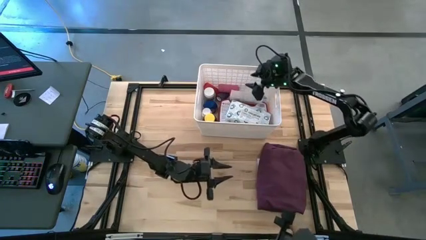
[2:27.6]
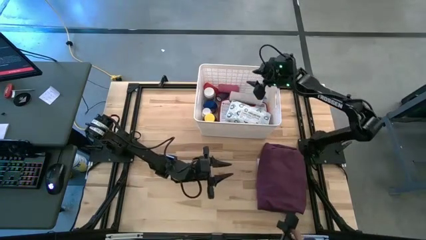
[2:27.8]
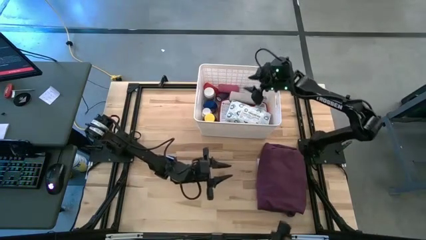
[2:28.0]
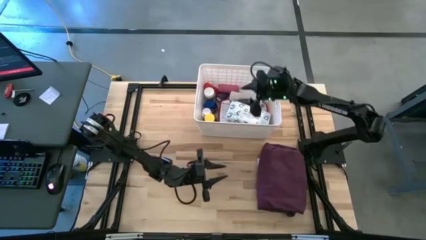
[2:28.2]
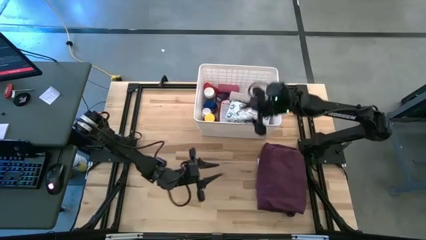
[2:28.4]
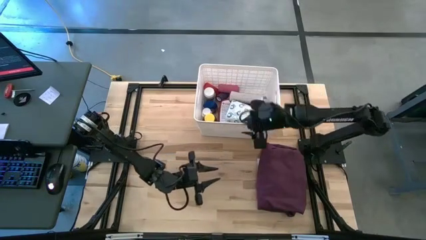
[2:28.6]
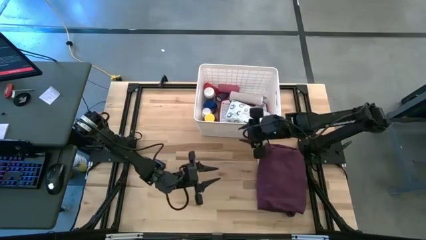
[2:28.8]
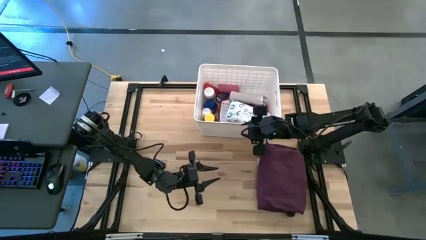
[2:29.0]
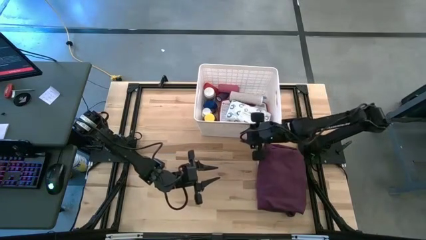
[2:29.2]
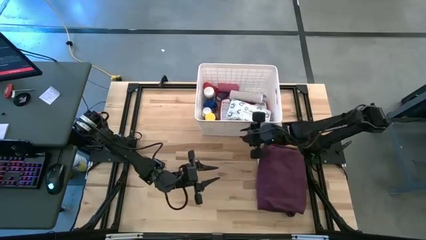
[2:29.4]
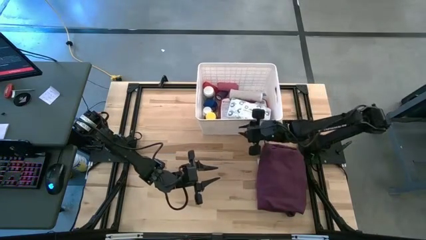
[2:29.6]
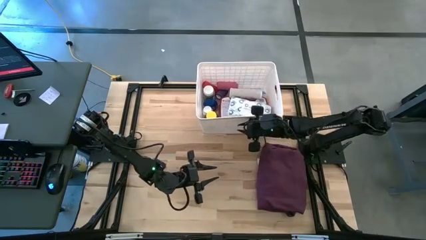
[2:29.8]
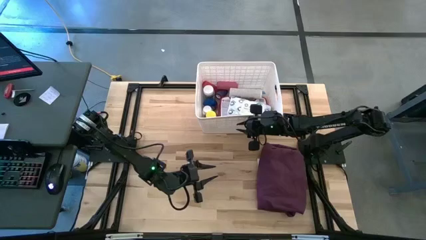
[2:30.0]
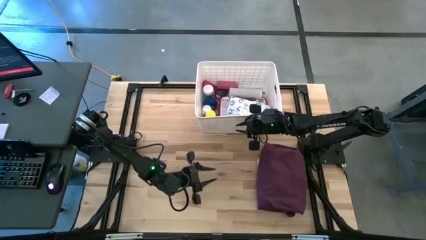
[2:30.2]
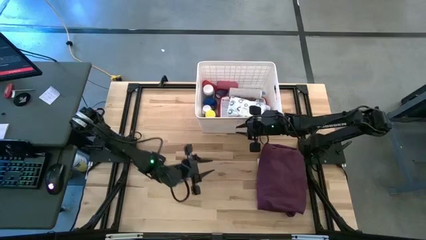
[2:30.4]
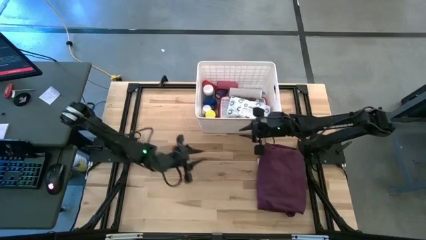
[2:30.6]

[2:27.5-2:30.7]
Task: Pick & place medical supplies in basket/bin
Adjust the white container

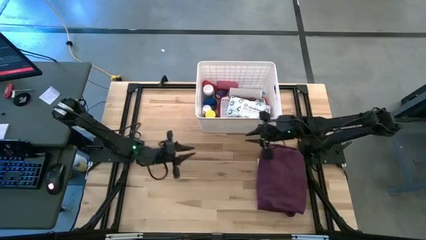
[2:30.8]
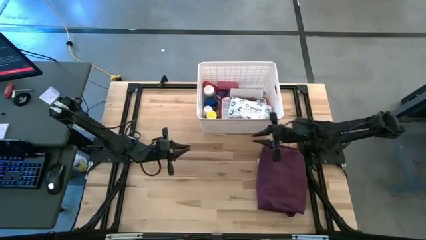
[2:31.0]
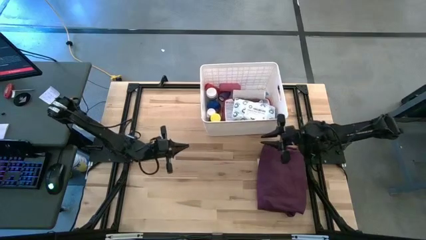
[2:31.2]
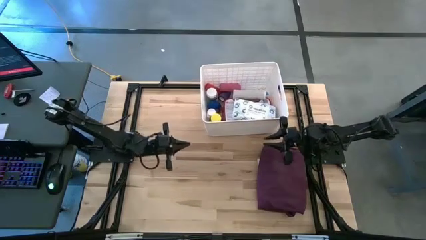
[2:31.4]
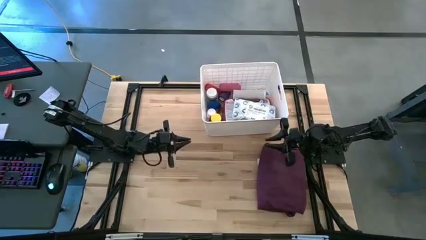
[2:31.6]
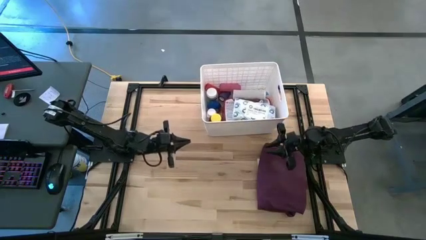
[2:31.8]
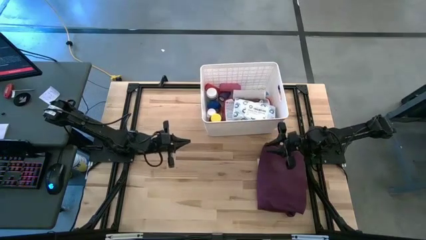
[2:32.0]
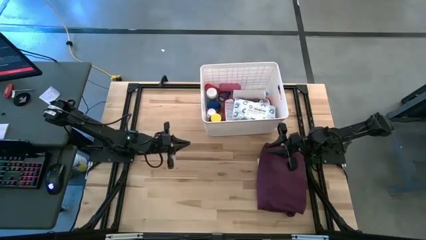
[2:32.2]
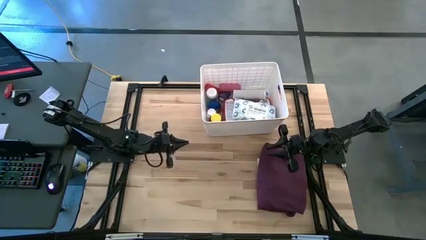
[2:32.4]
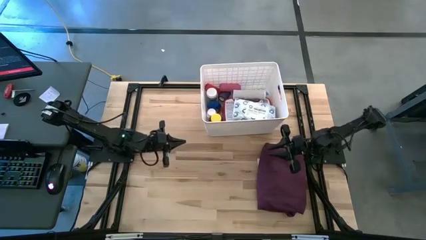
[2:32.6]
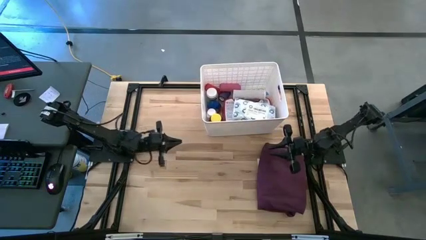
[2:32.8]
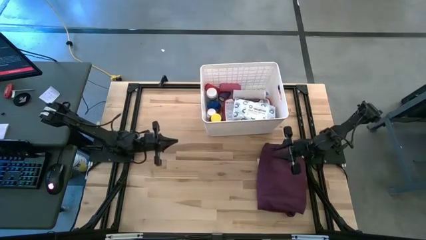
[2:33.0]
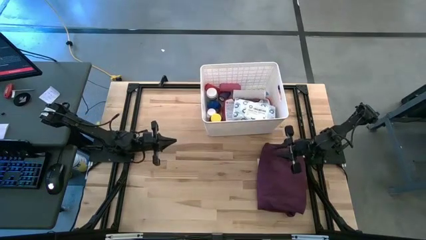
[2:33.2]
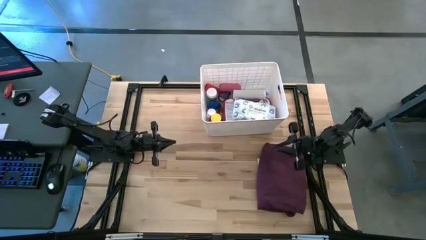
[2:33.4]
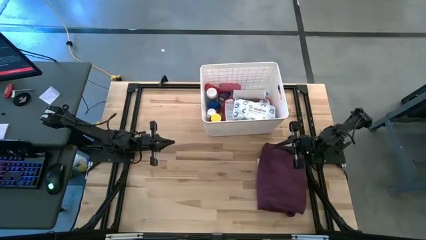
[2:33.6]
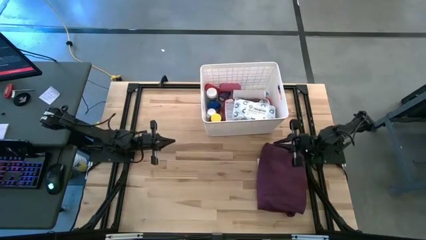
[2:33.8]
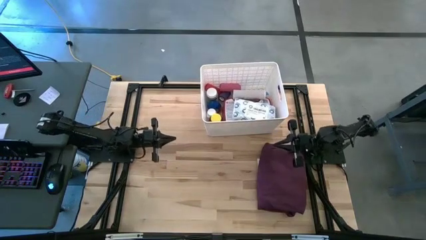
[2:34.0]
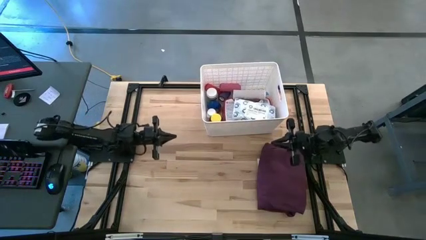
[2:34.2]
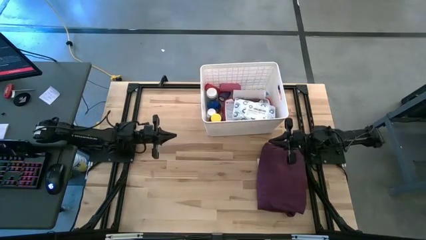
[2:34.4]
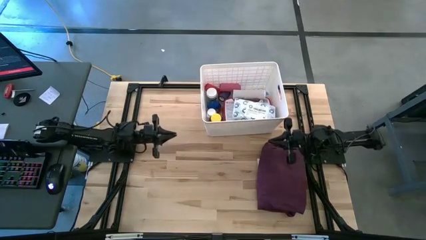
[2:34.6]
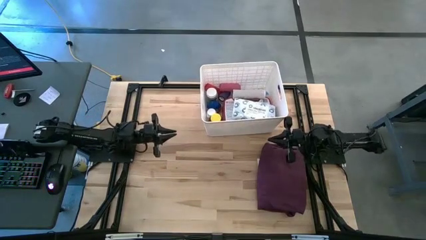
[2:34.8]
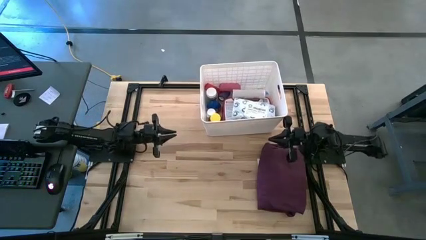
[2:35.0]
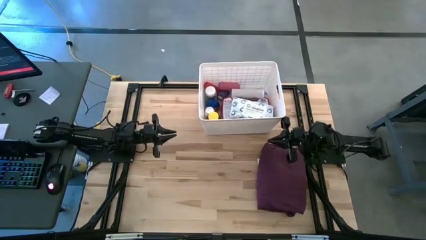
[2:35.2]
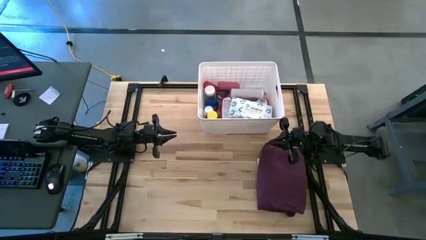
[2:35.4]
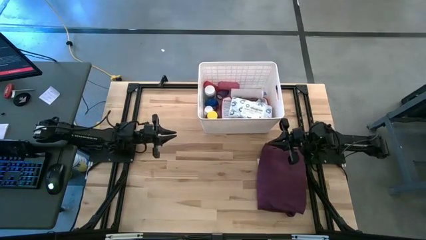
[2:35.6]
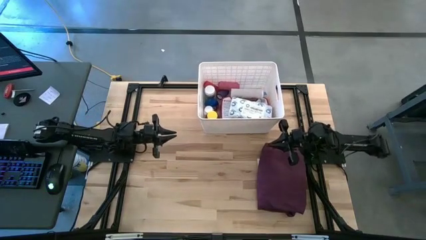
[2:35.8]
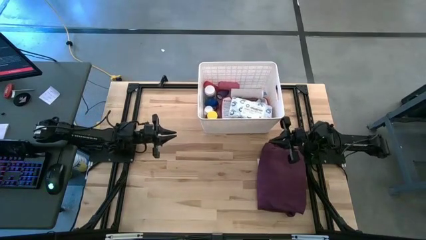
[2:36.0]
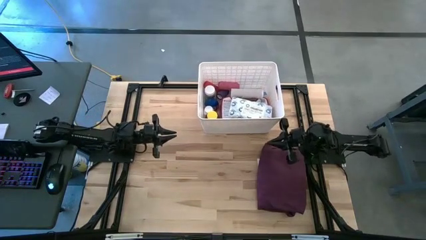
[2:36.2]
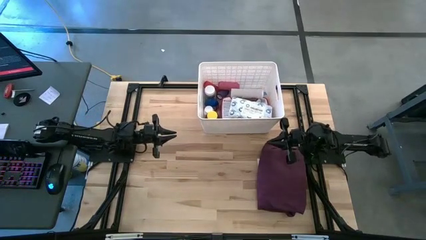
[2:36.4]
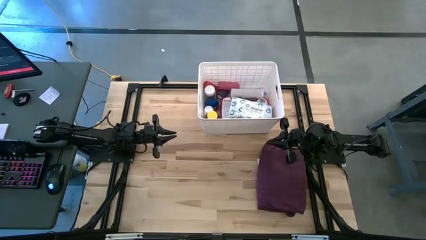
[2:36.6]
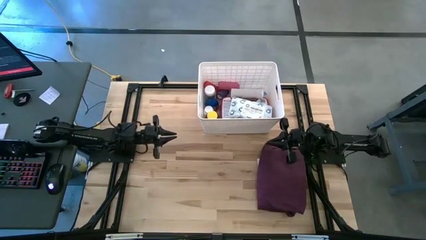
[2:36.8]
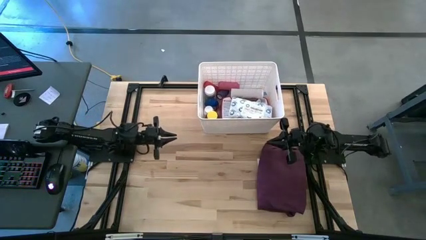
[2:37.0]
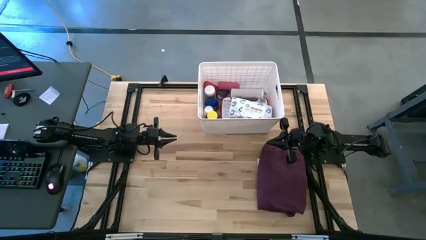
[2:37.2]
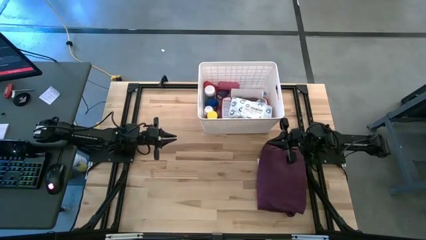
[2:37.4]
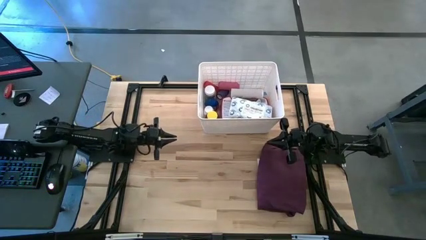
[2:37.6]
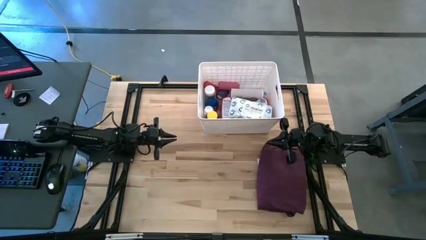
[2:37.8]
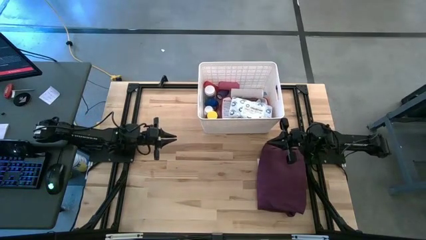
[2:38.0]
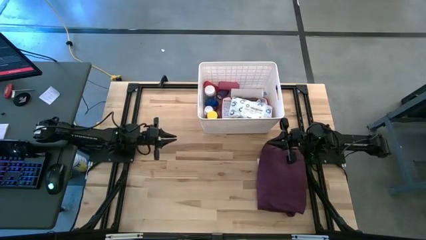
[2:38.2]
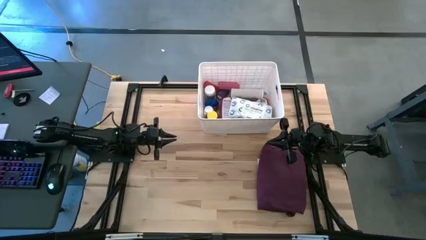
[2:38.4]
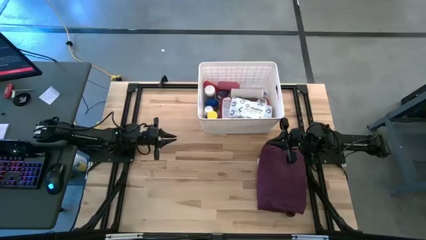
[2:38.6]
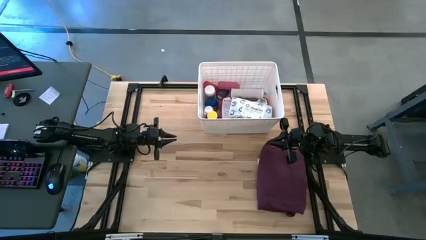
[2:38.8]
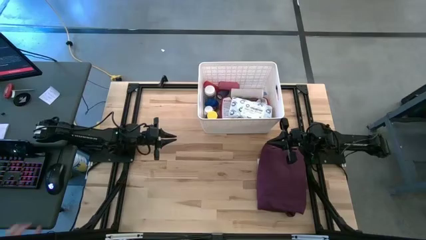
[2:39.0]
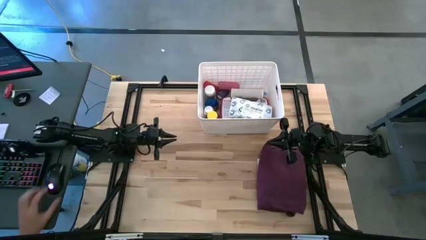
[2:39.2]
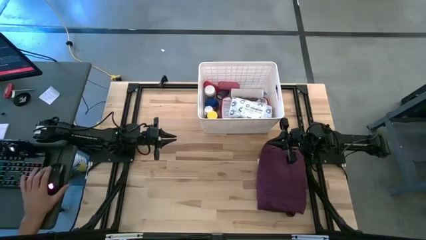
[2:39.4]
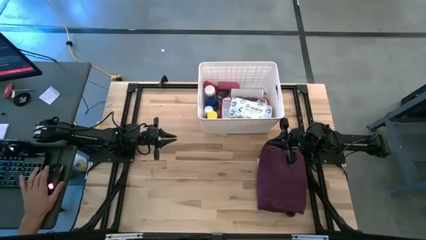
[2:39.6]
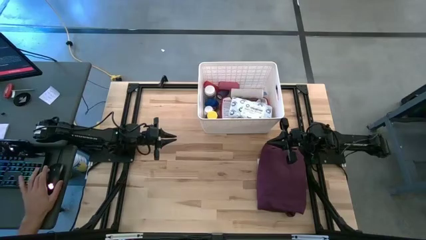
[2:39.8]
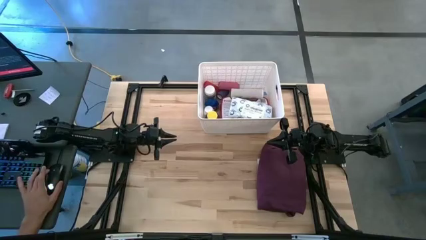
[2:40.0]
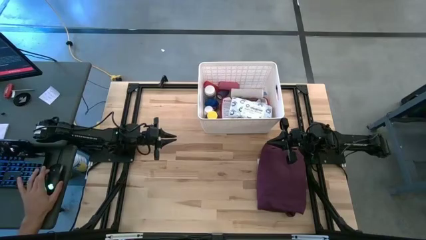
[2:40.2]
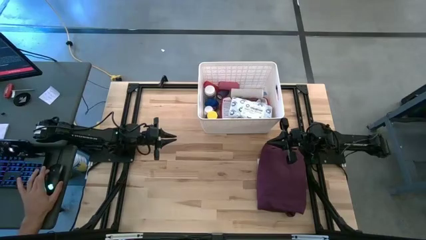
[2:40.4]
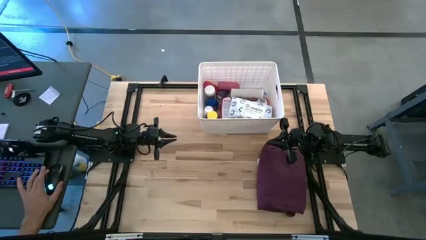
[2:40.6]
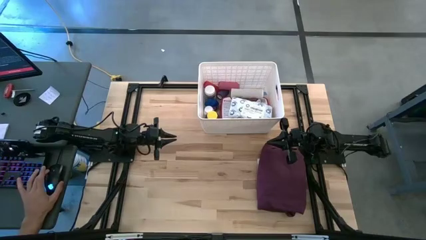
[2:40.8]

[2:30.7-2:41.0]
Return to Home Position

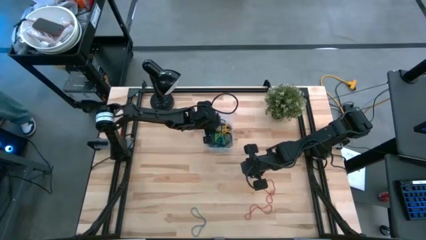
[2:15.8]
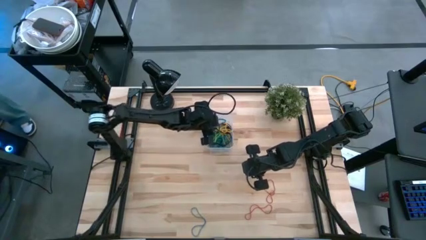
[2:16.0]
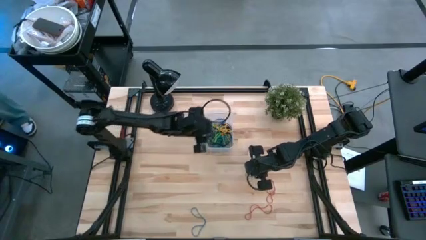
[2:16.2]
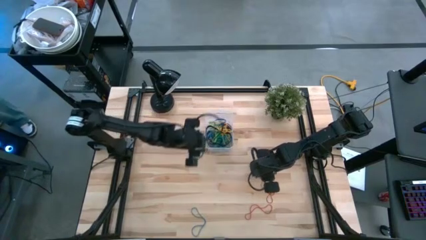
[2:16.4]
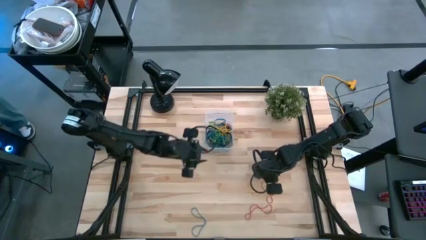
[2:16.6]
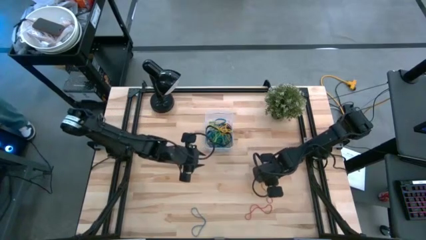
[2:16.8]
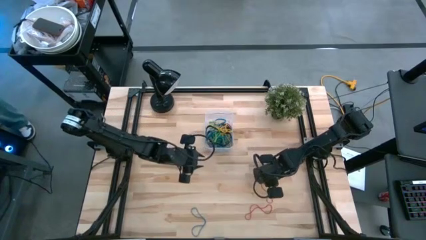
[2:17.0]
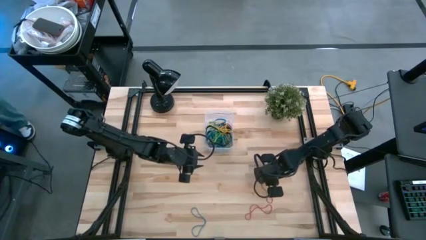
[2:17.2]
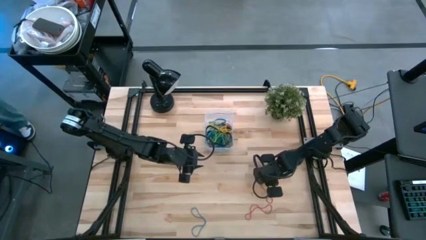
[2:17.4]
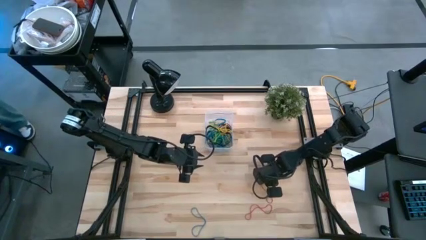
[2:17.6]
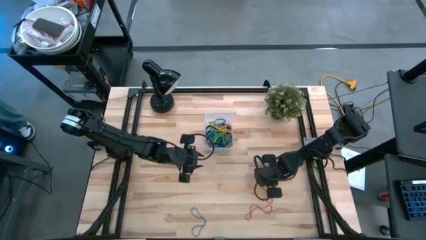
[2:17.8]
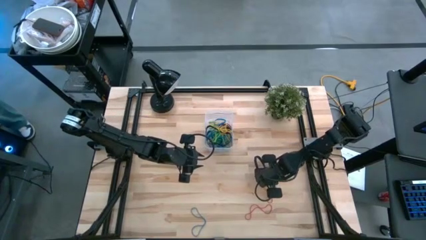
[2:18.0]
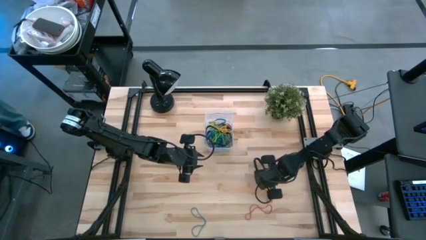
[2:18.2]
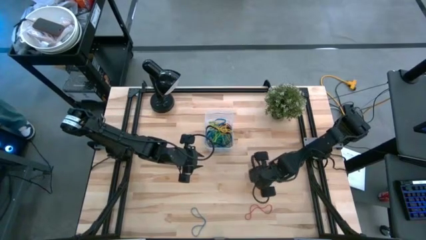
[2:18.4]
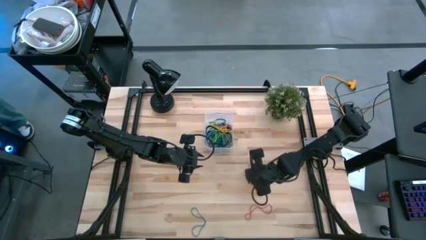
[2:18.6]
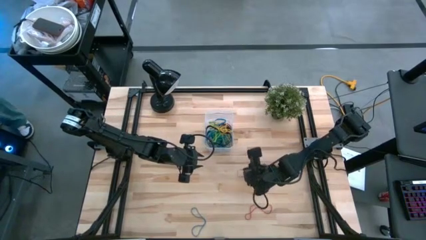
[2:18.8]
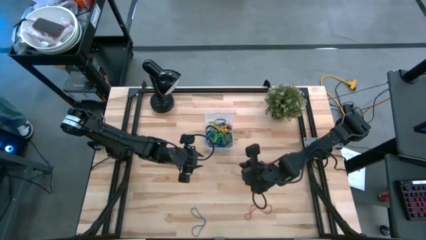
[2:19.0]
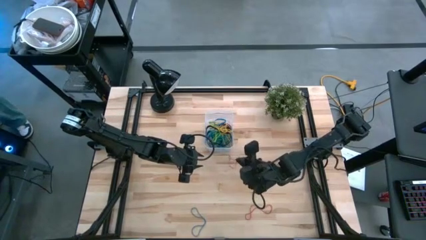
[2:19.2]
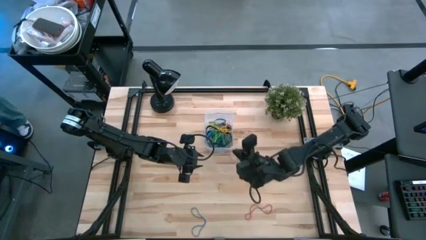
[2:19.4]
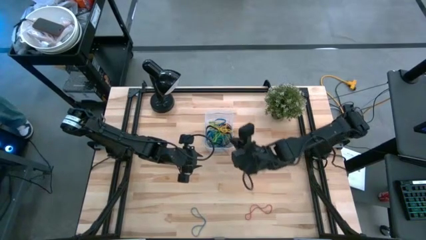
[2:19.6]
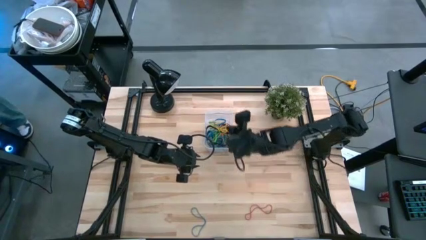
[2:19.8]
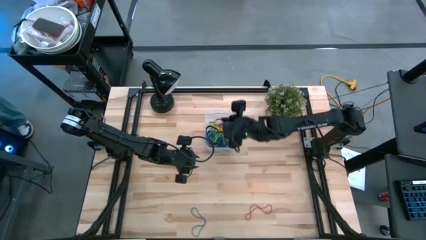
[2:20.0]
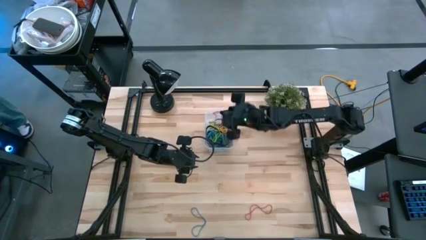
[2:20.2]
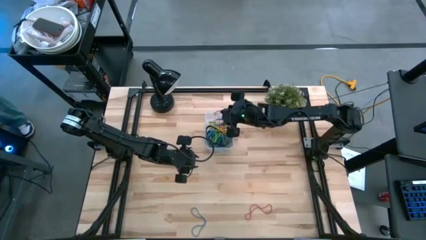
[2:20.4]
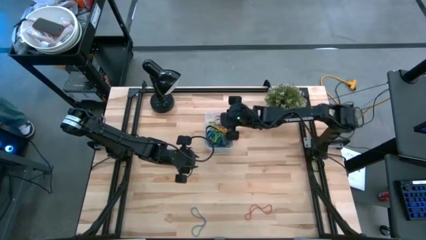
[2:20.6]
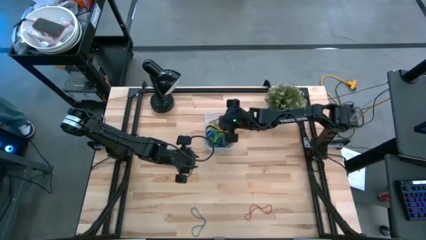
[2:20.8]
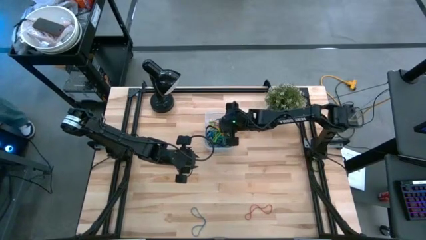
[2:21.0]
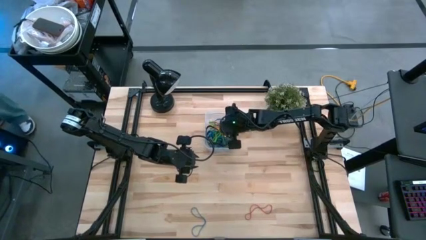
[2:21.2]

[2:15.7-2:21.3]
Task: Pick and place rubber bands into bin
Put red rubberband into the transparent bin
